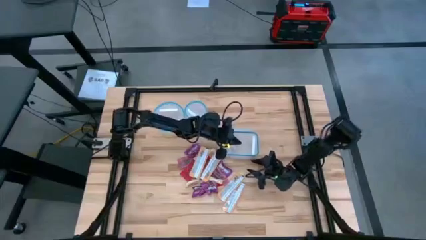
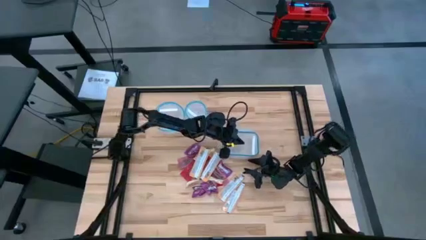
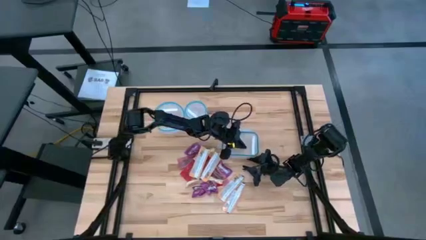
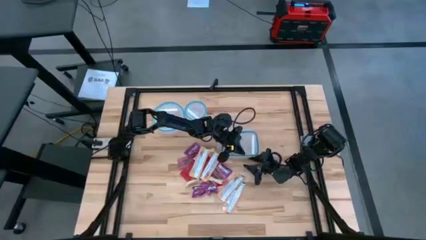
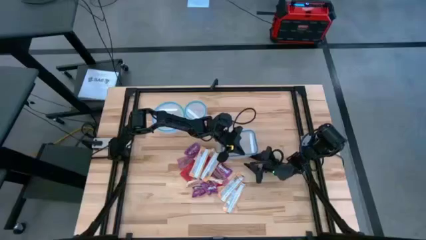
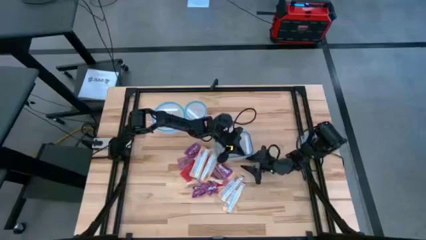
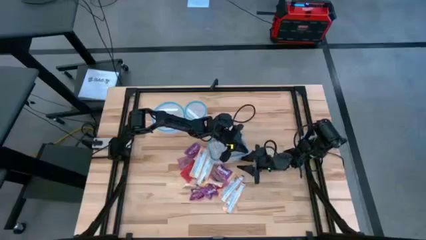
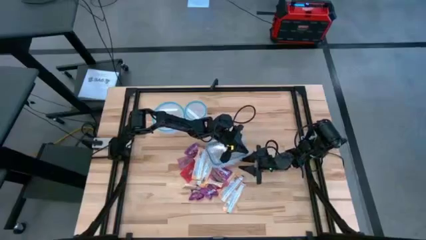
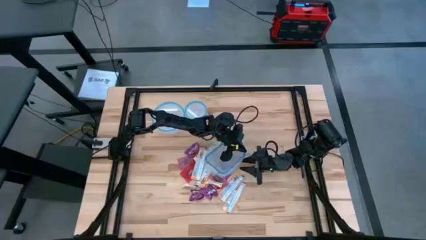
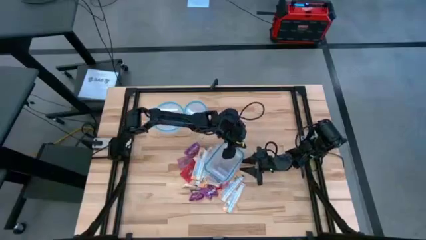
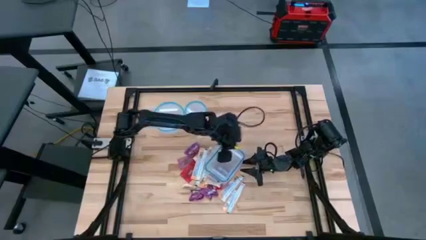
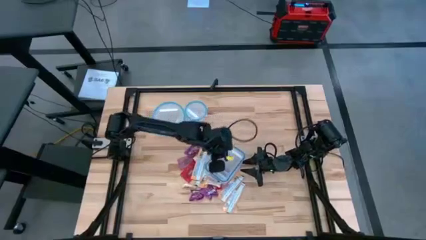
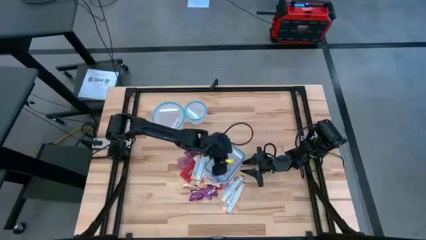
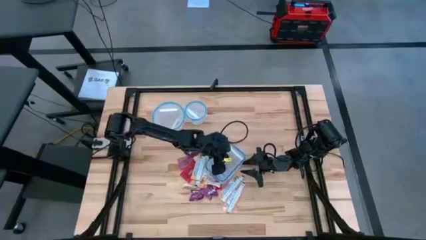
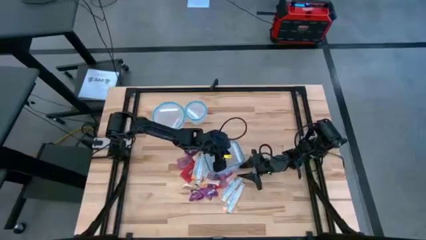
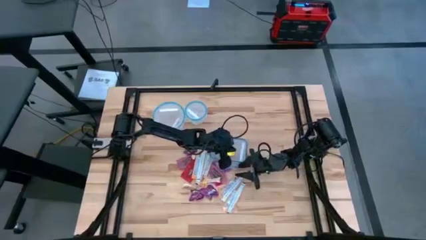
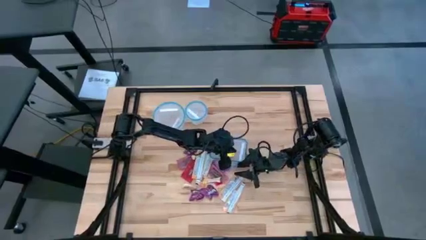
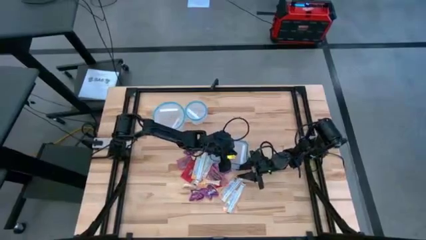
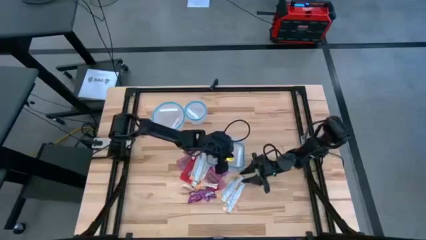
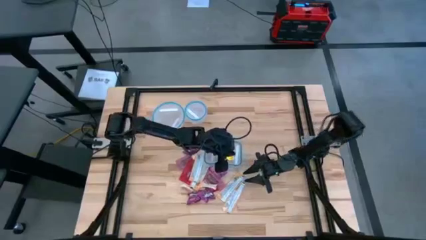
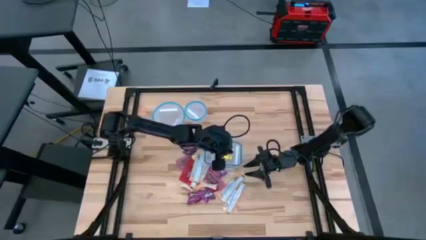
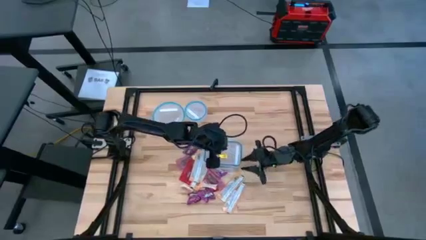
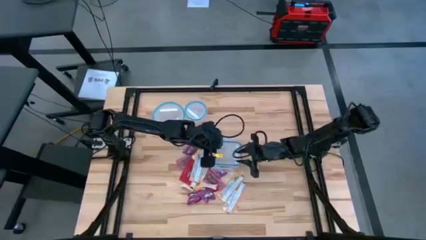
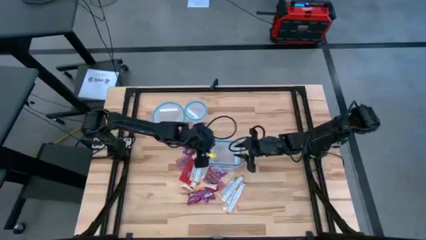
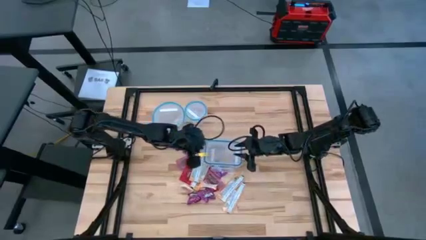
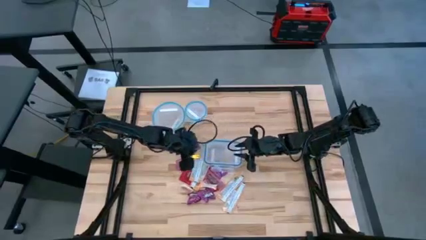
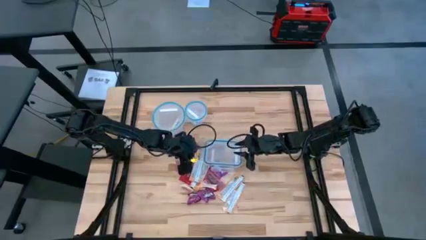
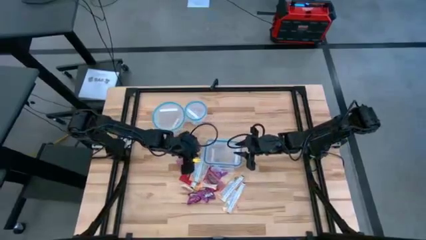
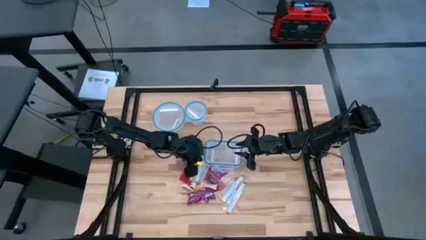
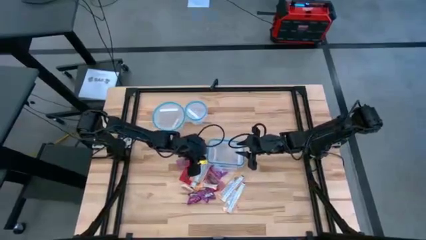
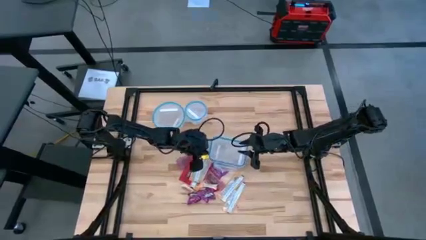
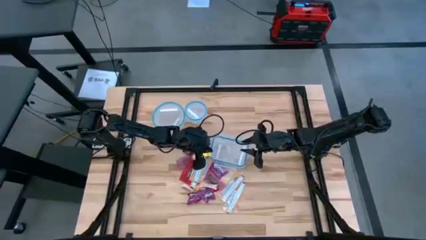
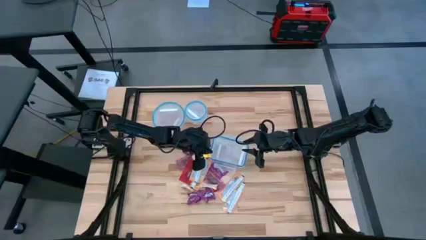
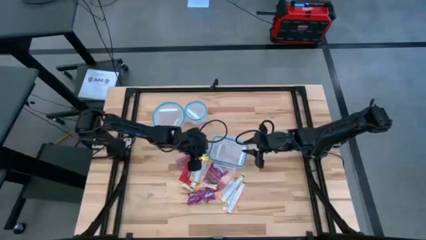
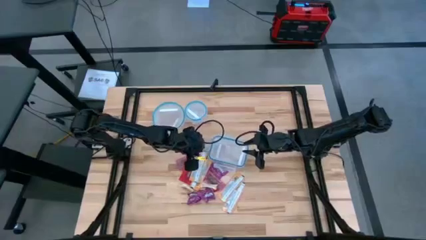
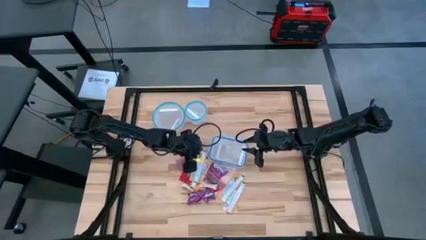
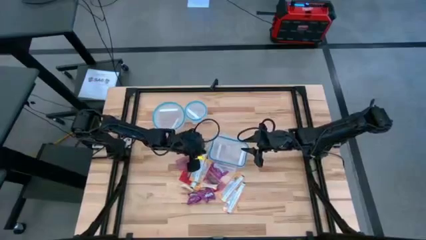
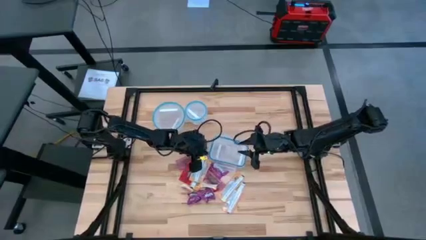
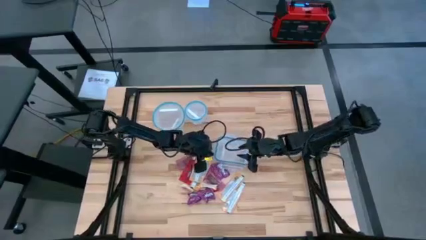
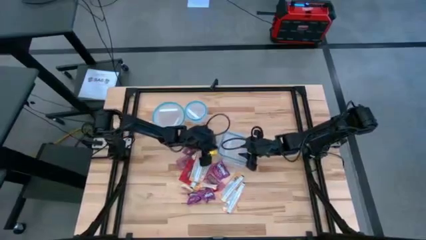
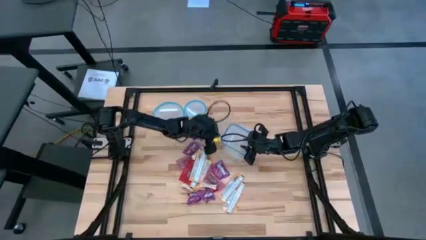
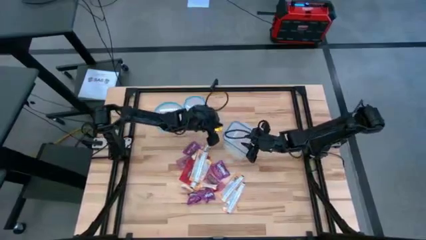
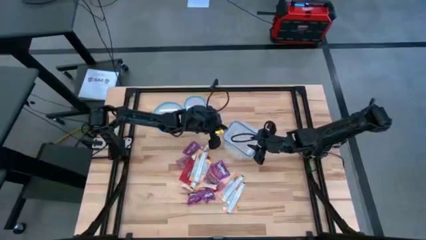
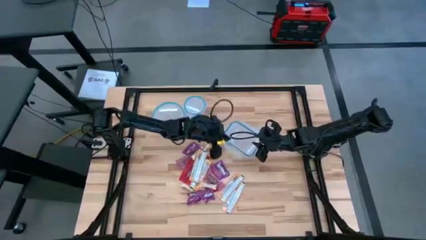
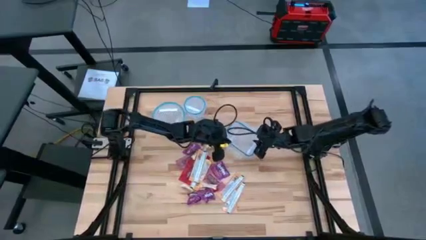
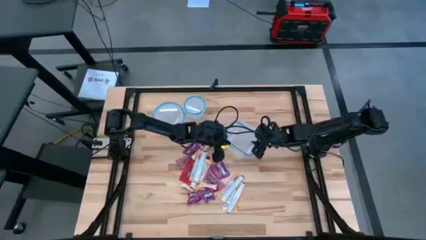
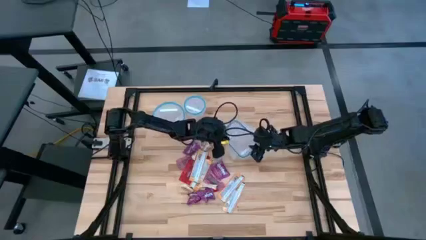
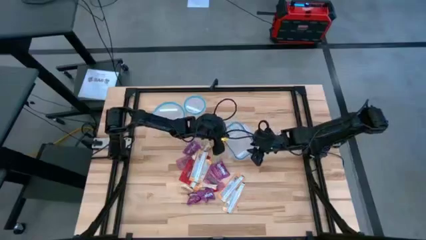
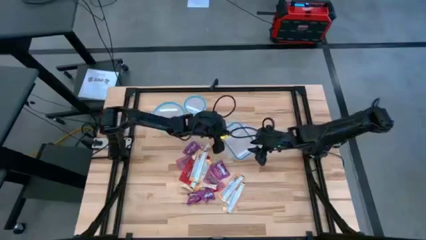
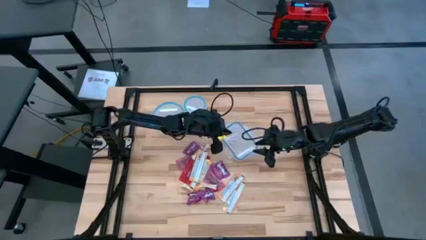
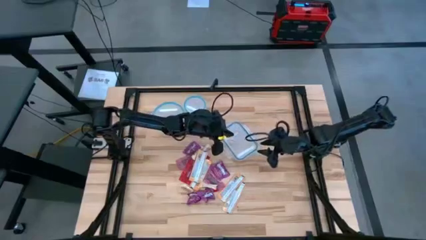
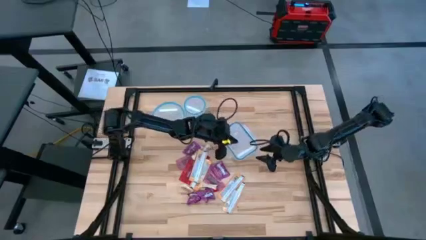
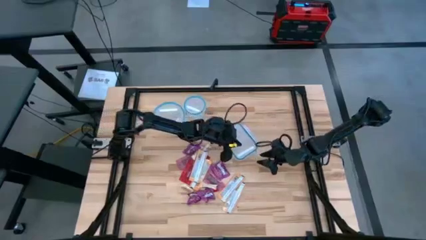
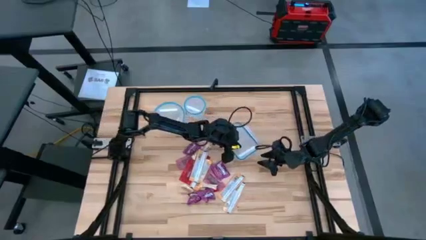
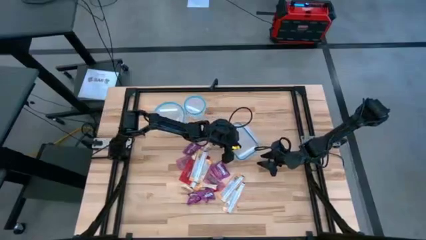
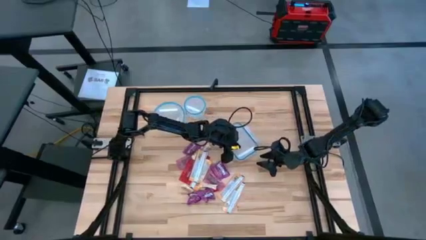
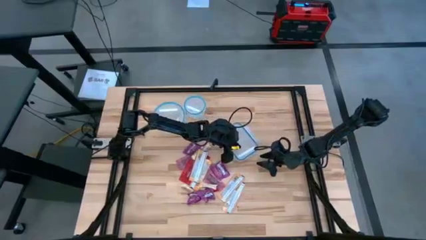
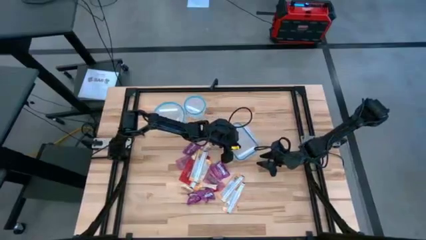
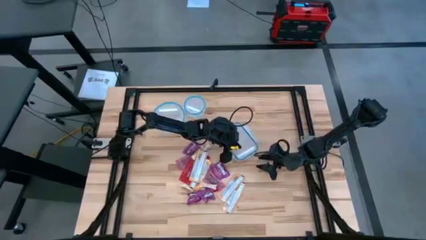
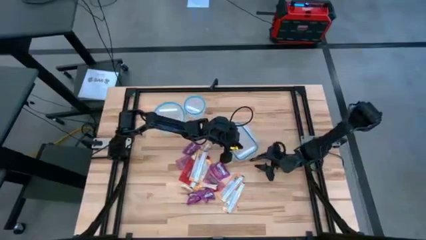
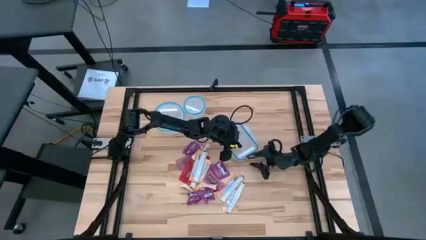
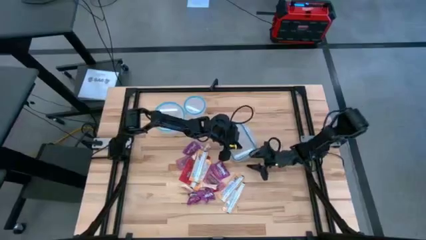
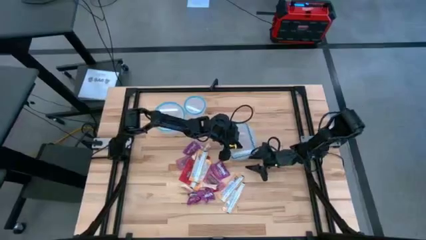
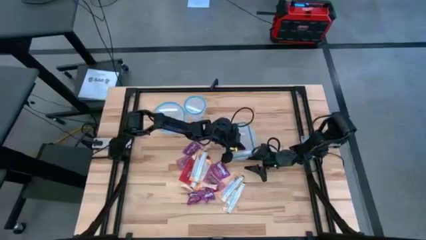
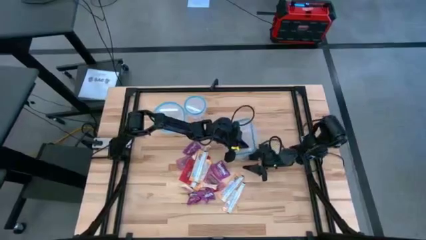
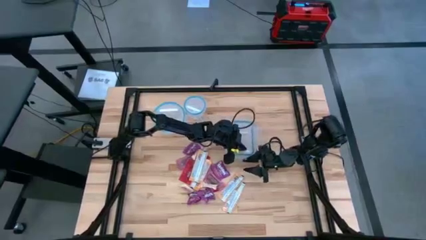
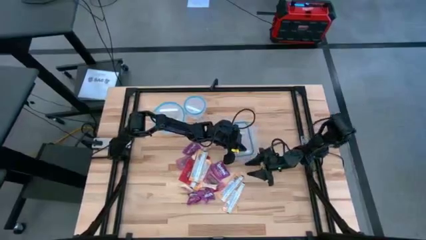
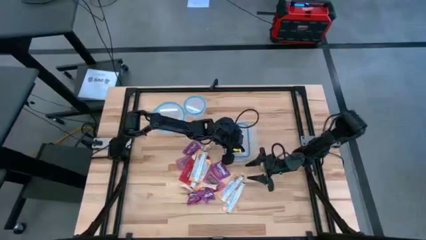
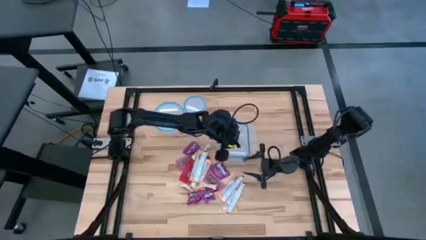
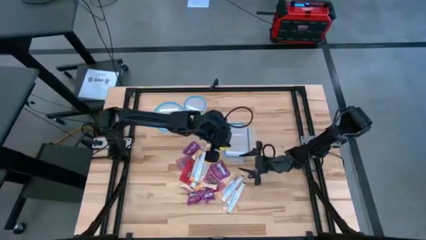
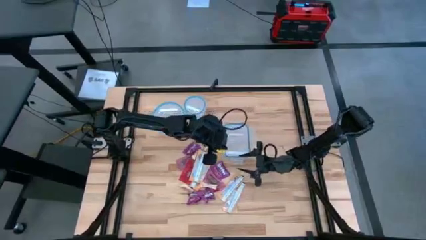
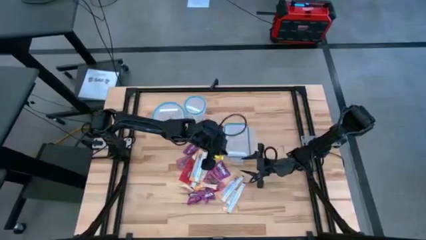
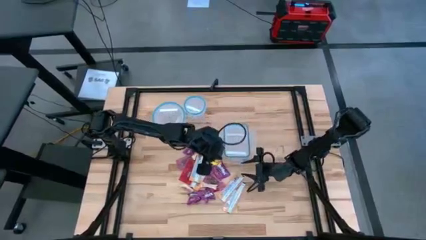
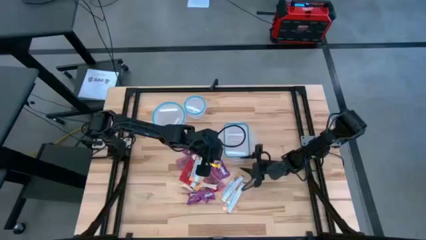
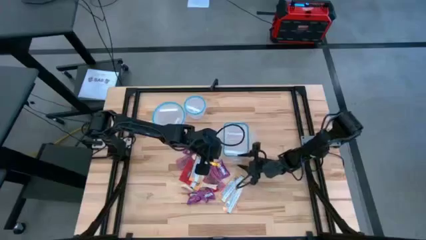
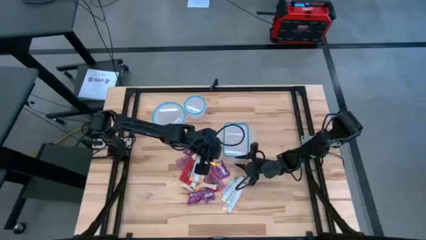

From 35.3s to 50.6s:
Task: Sort candy
Open the rectangular transparent bin

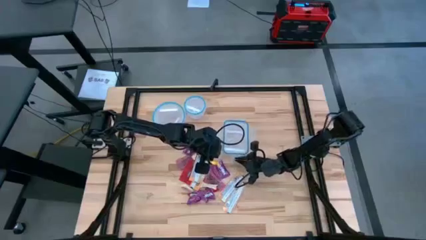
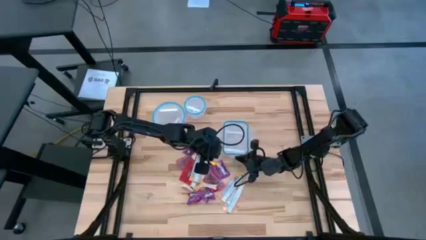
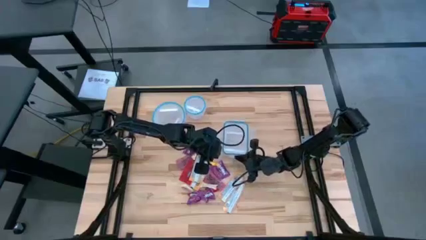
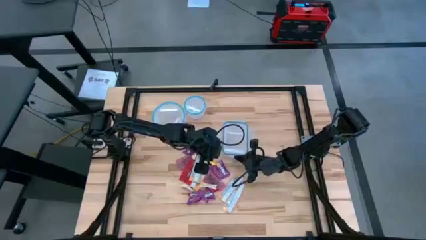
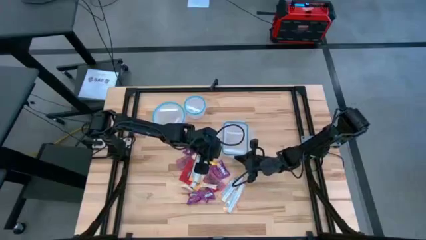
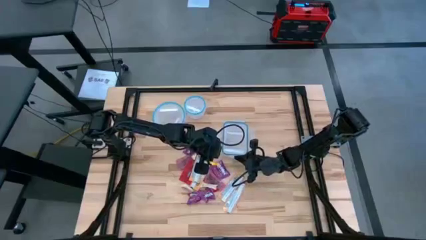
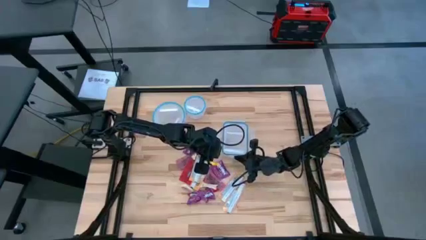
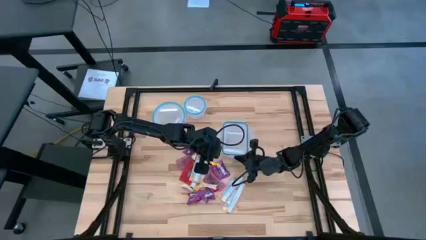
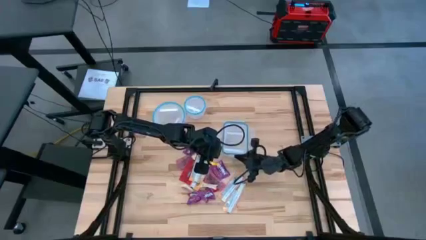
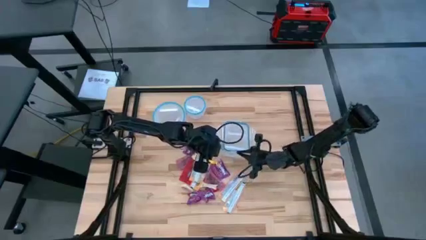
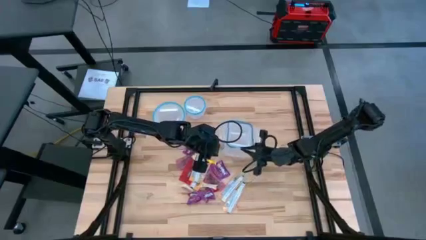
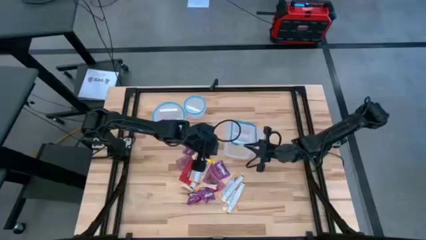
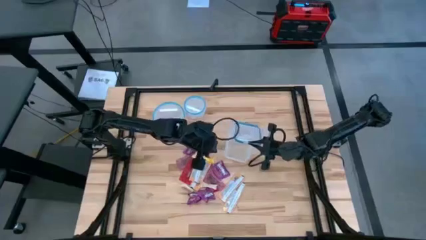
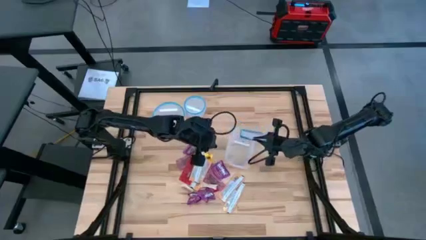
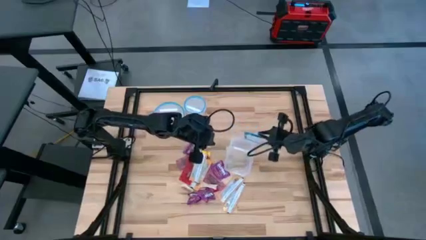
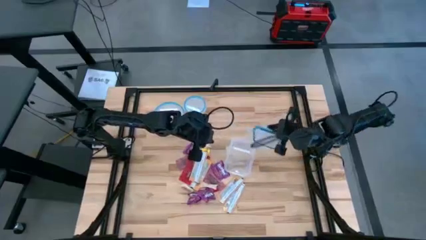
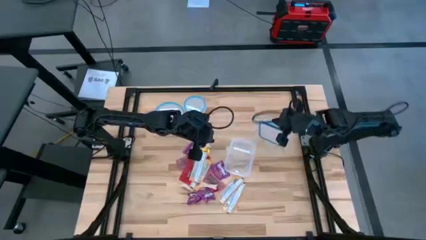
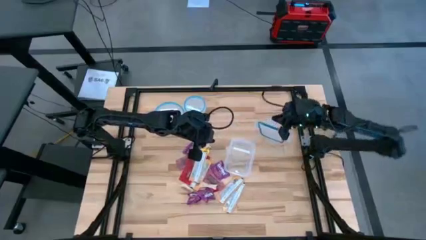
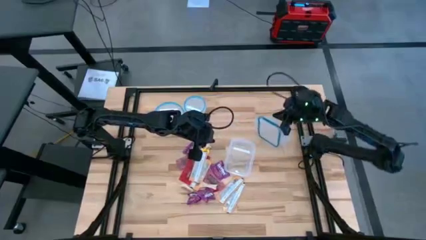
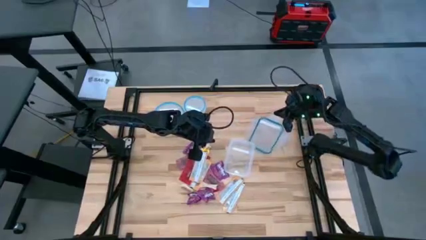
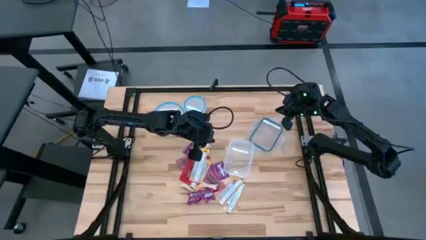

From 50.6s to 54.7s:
Remove the rectangular transparent bin's lid
